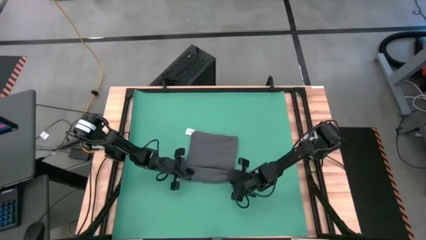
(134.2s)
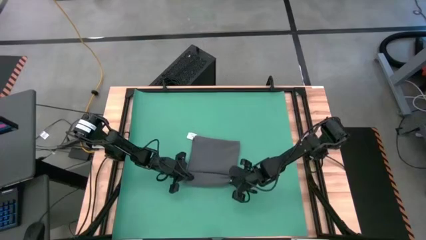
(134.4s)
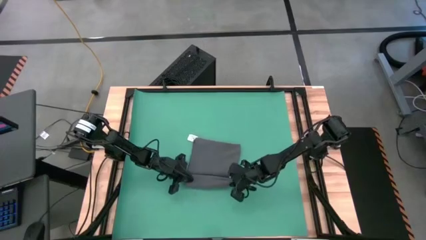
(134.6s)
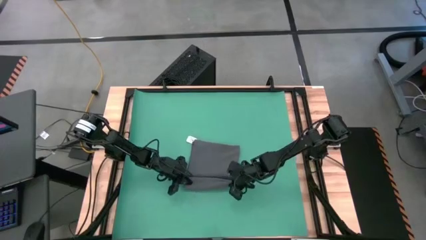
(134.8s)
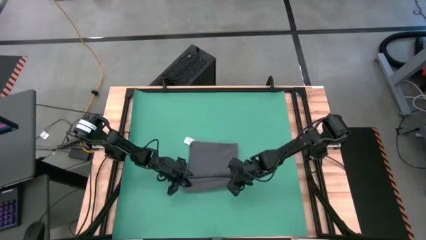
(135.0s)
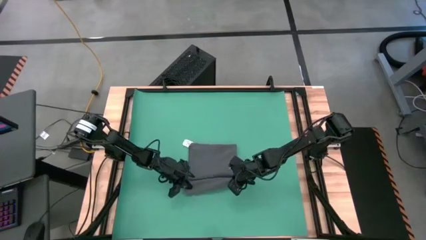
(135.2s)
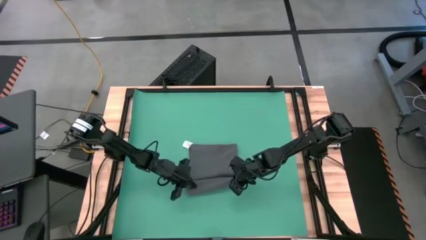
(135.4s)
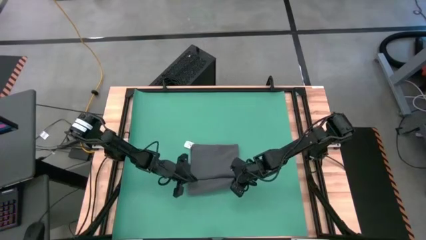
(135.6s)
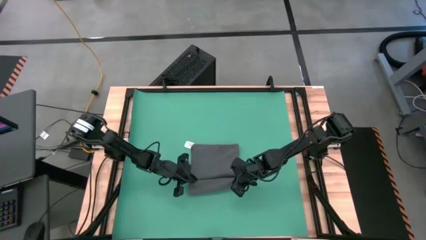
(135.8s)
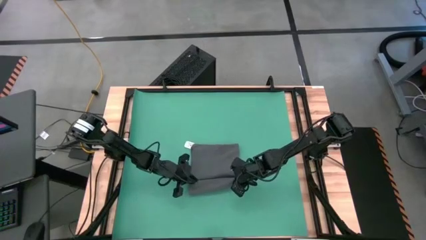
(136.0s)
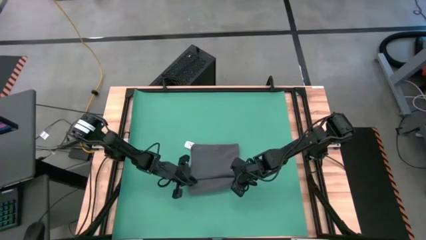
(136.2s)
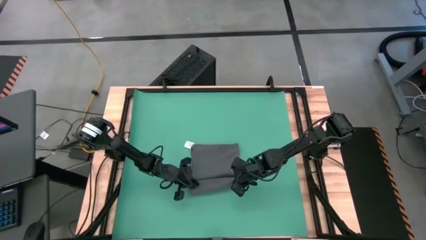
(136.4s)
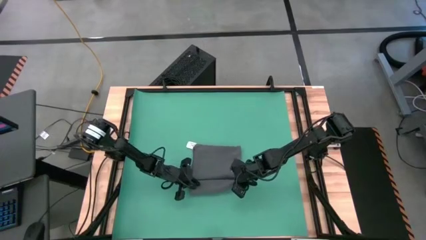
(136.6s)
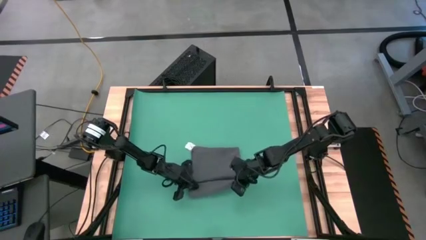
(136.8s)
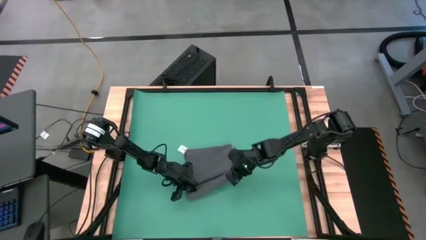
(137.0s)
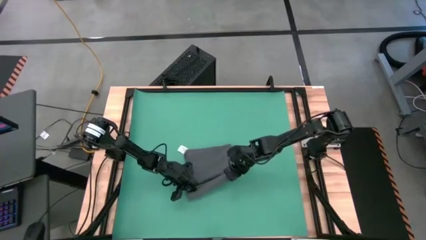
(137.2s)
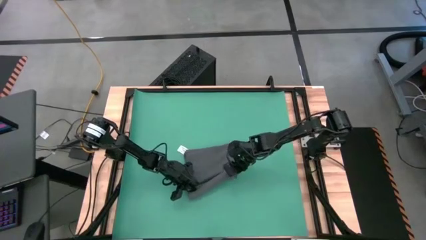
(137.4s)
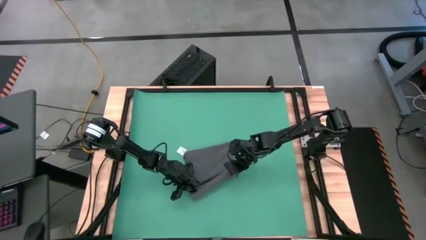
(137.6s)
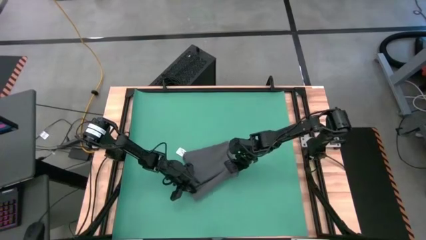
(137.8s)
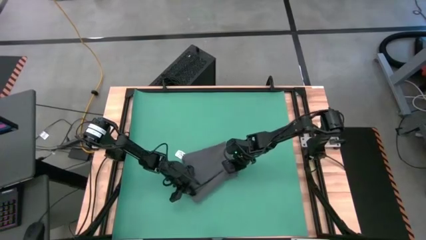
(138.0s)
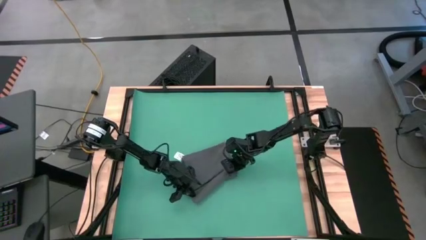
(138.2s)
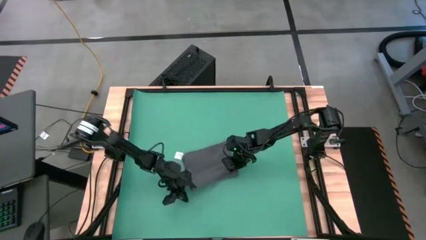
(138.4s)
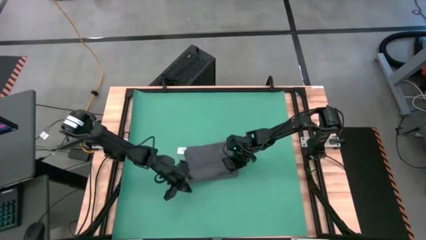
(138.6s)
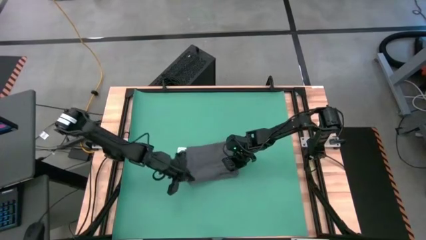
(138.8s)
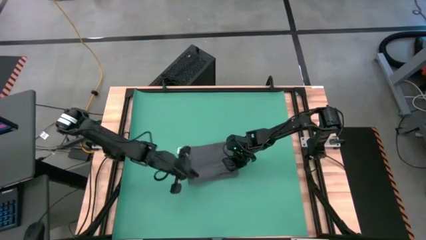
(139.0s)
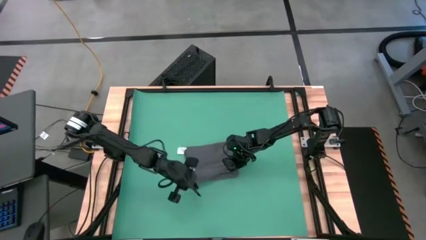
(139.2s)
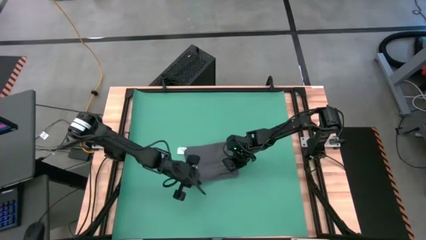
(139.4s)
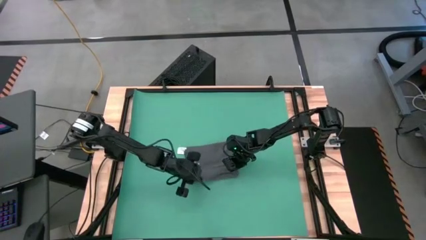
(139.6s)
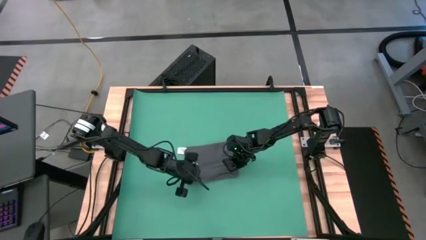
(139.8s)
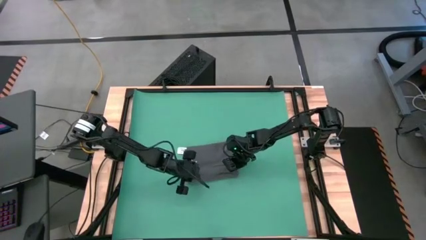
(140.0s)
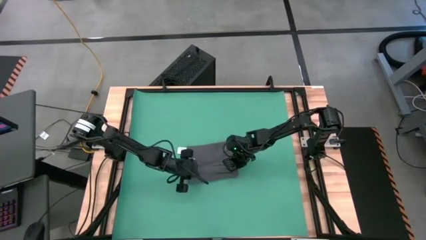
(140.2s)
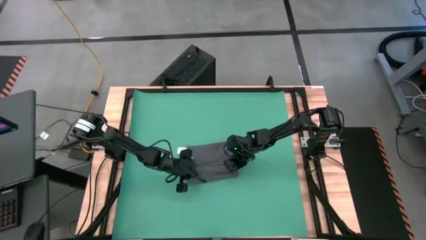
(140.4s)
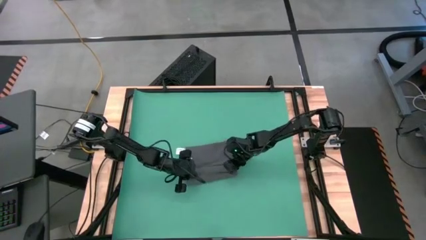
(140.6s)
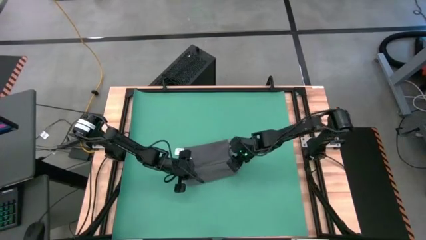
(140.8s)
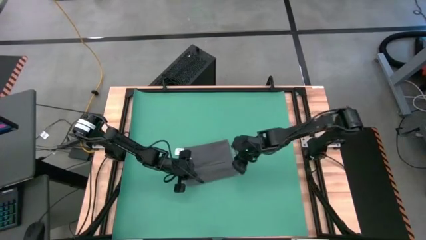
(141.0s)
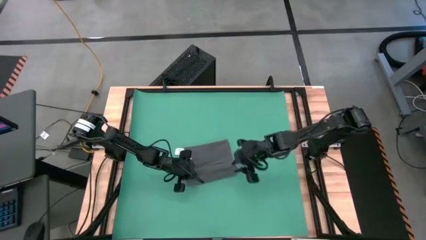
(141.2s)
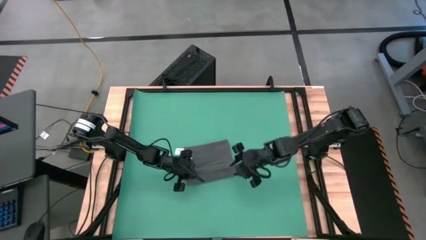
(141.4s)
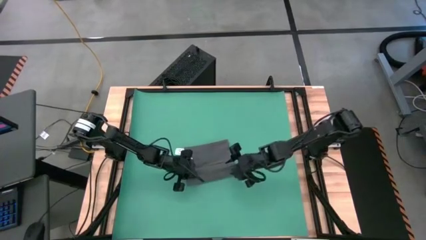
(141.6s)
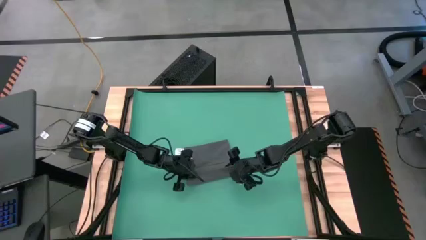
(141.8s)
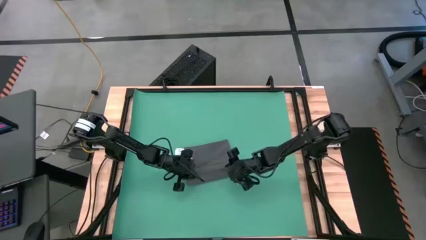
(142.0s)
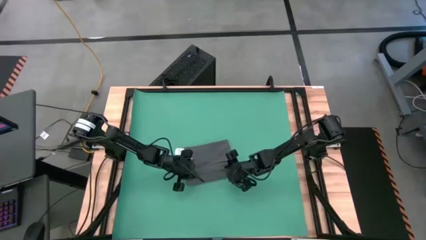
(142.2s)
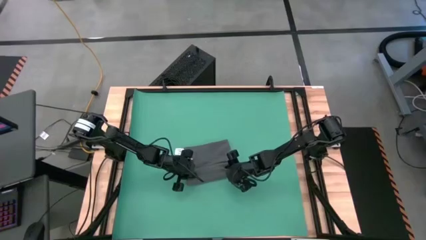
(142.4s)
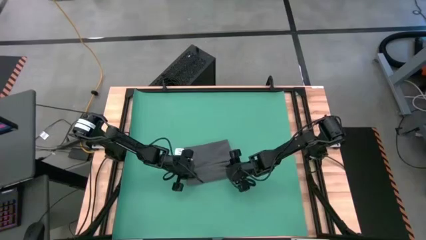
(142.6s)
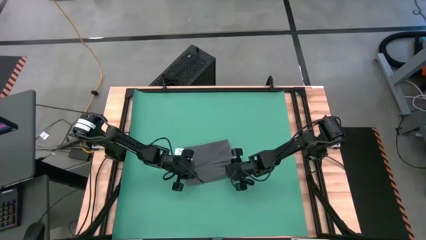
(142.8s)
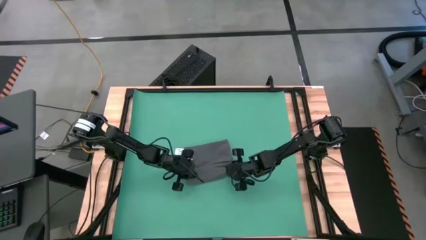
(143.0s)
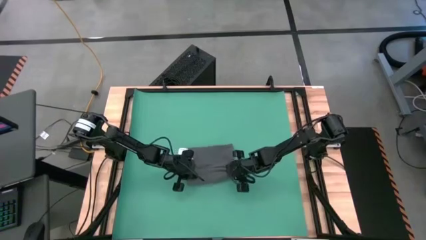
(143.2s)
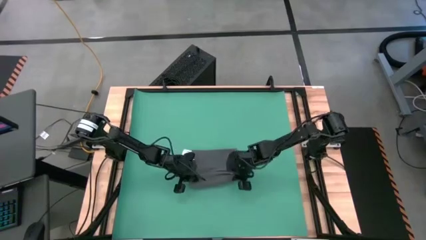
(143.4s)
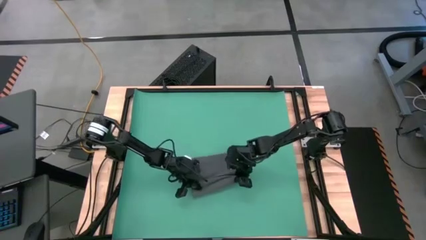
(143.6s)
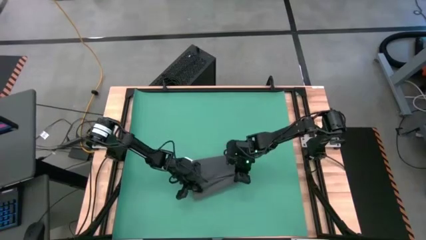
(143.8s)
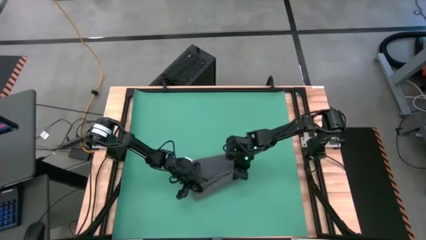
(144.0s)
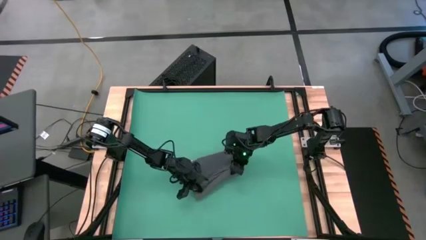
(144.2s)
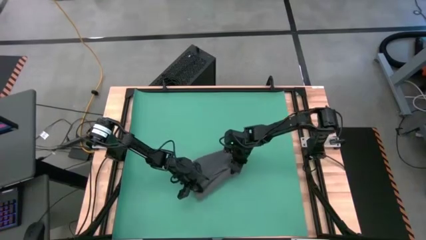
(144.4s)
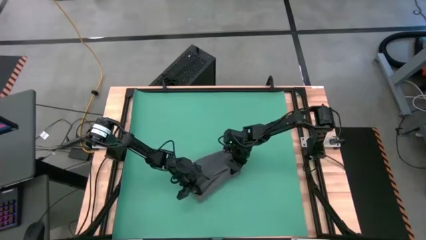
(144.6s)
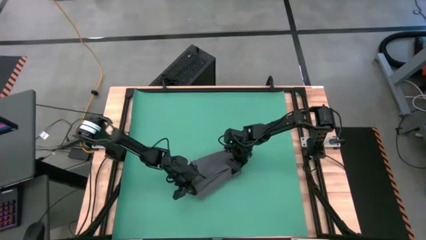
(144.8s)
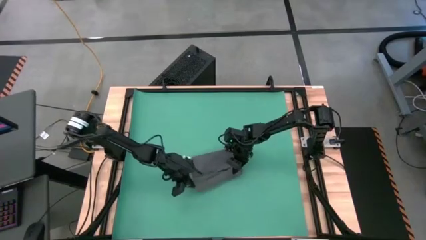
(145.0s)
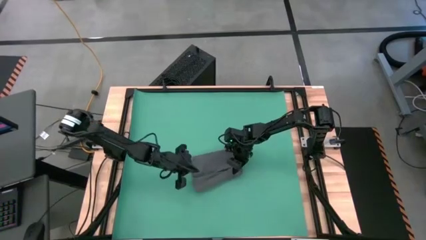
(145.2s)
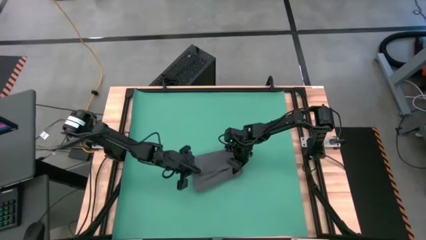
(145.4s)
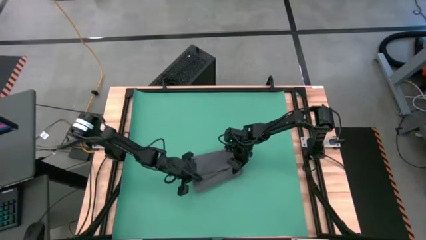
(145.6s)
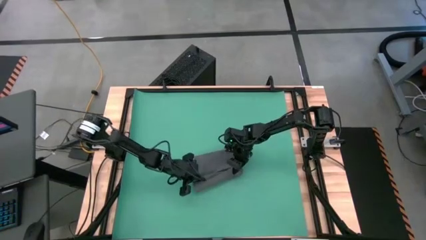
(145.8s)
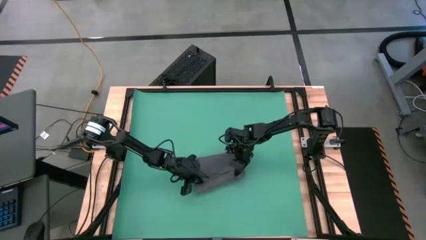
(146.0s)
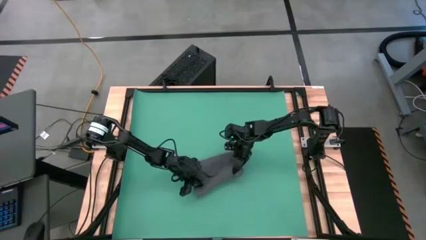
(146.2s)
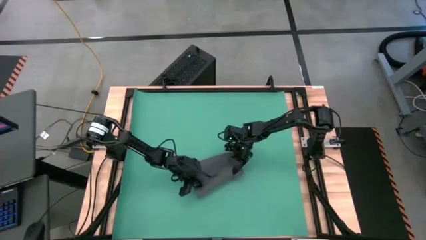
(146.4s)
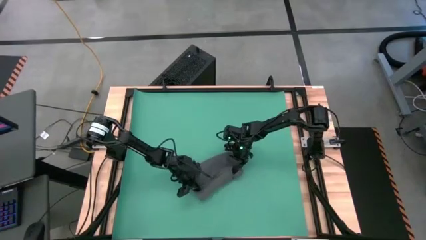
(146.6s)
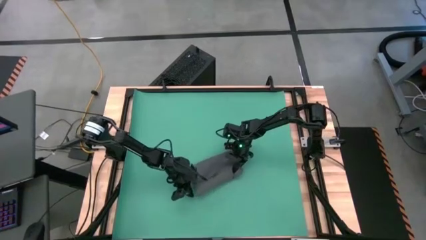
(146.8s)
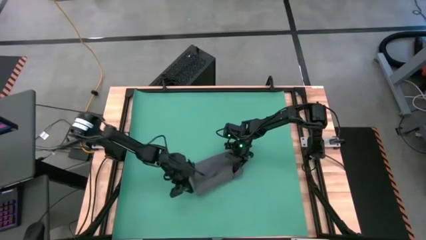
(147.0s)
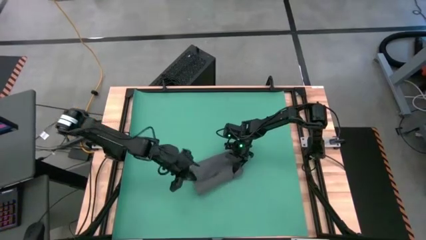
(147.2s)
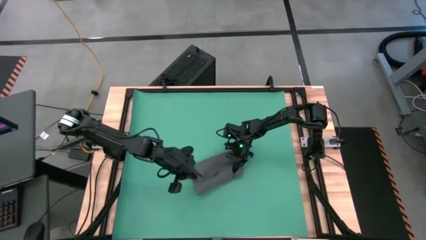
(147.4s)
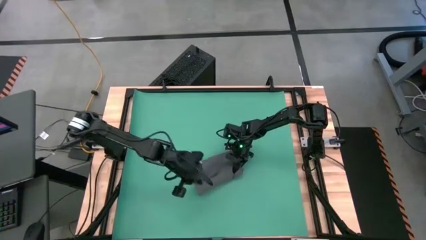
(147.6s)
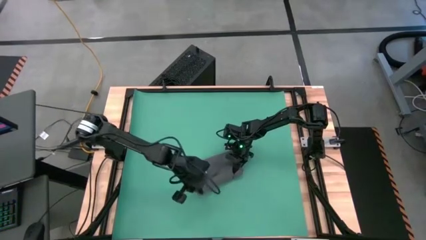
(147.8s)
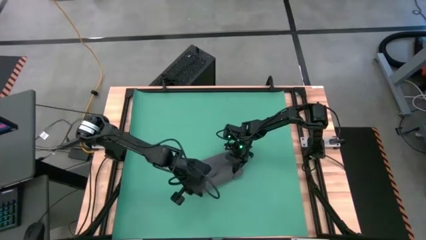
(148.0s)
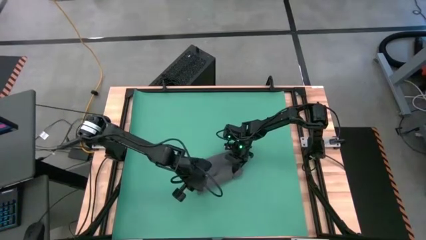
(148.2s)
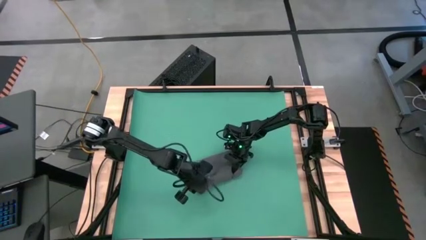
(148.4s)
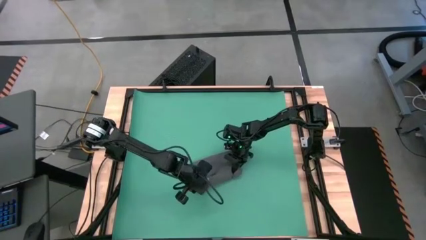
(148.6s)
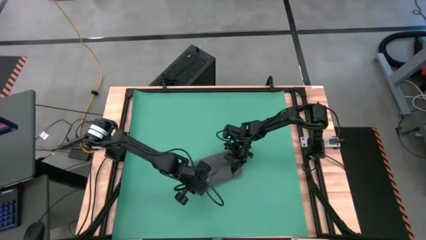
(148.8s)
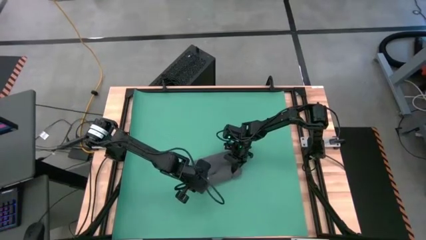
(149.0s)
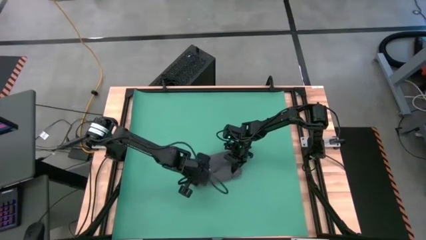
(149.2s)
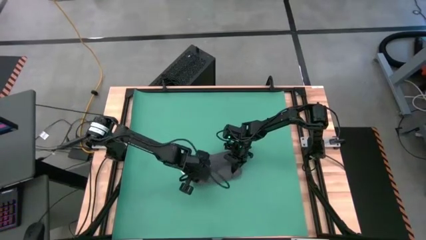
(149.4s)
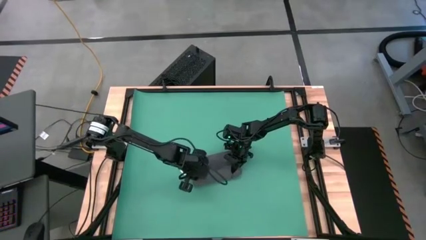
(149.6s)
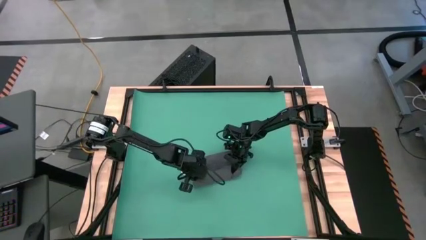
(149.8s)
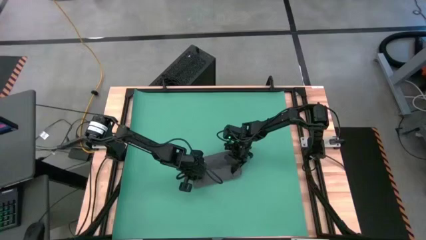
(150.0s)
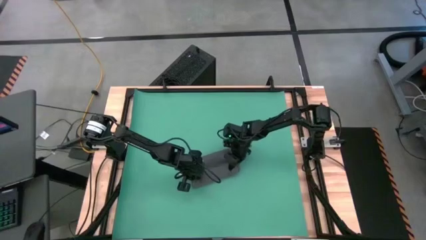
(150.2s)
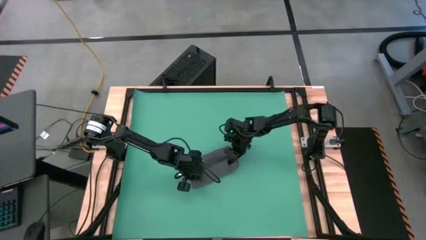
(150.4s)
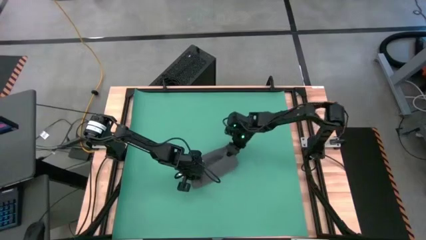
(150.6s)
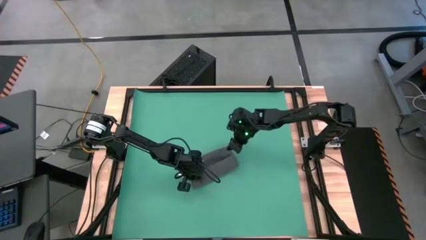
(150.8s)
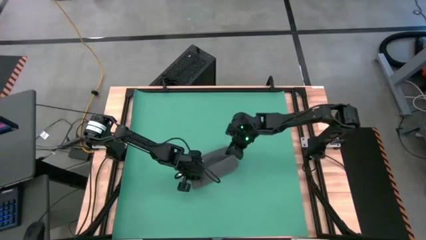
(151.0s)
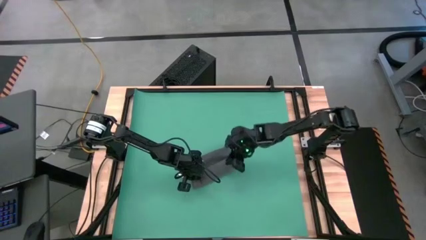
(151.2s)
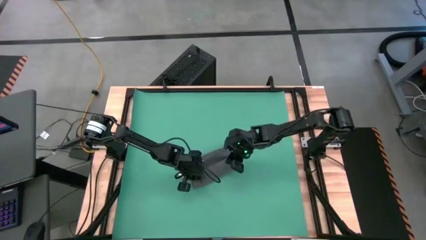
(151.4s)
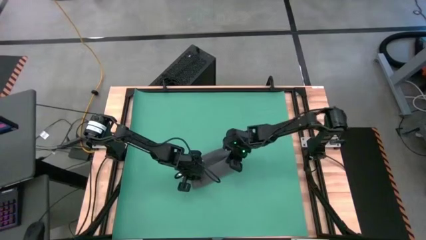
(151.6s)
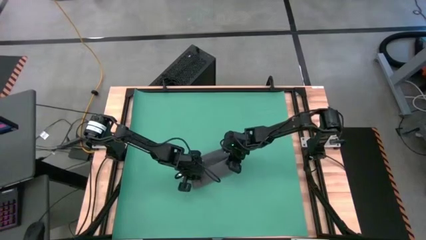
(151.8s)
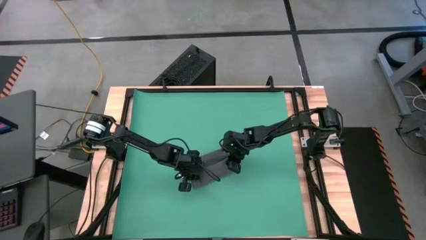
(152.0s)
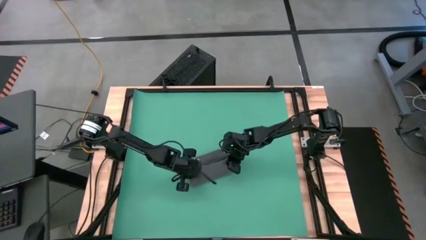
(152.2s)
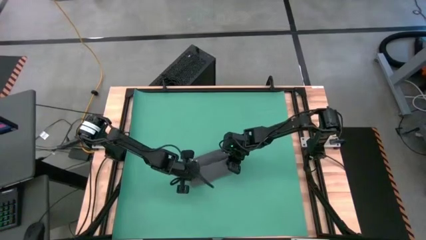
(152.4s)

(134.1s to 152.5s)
Task: Roll towel
Roll the gray towel
